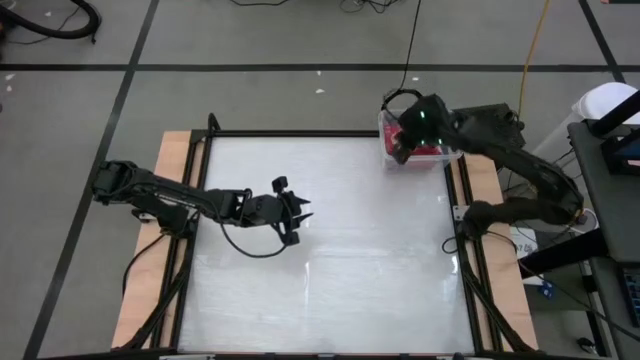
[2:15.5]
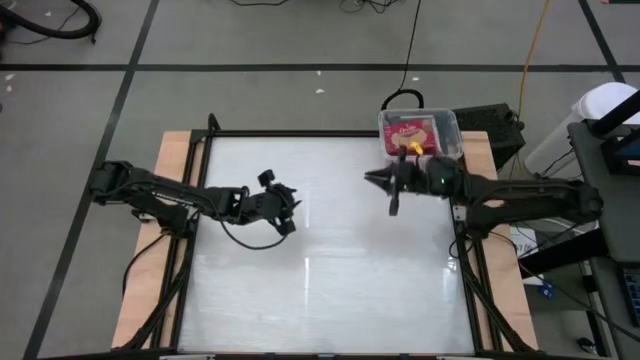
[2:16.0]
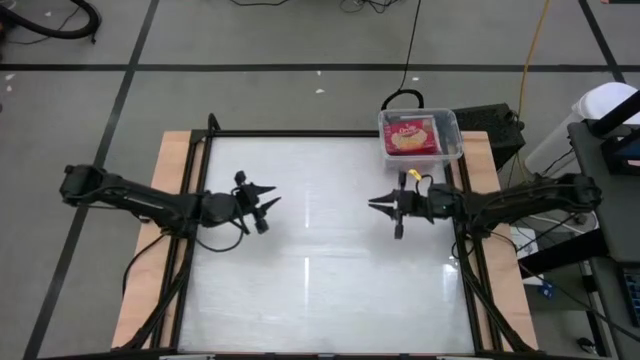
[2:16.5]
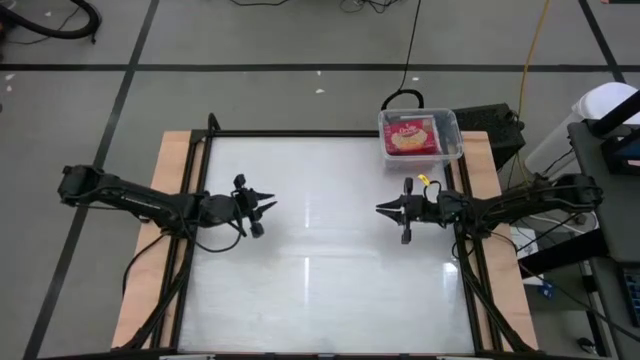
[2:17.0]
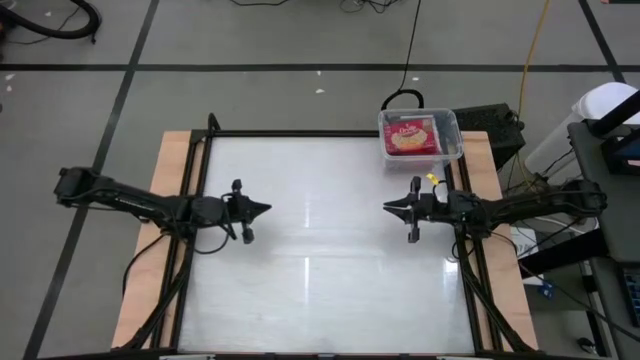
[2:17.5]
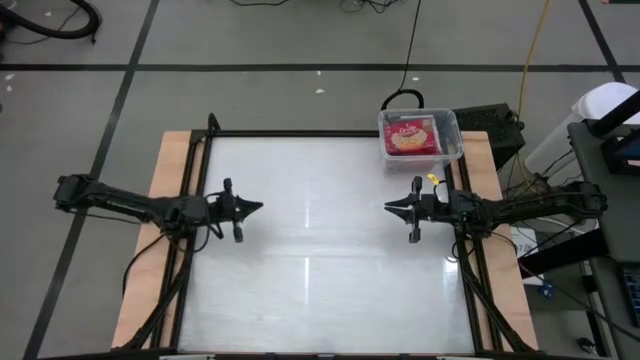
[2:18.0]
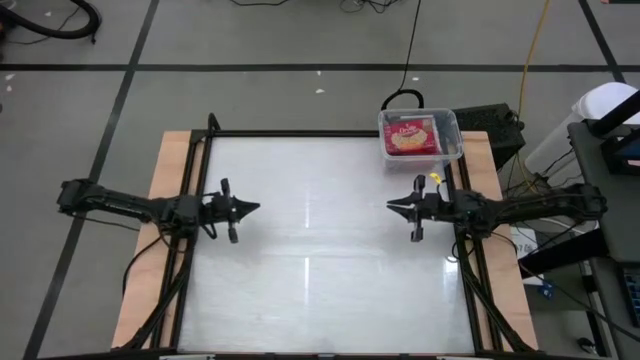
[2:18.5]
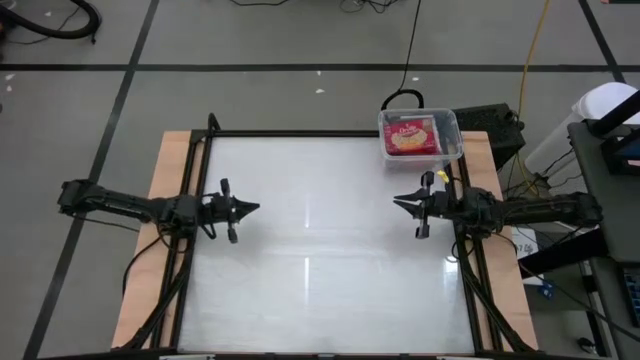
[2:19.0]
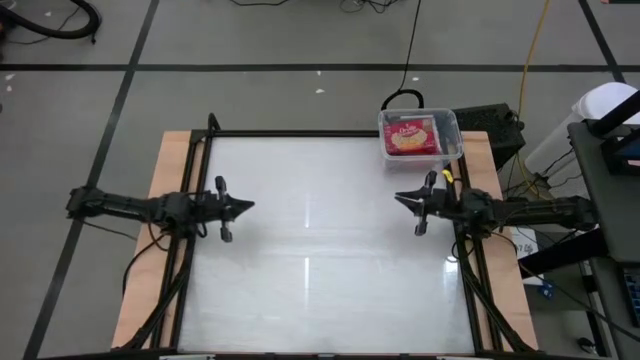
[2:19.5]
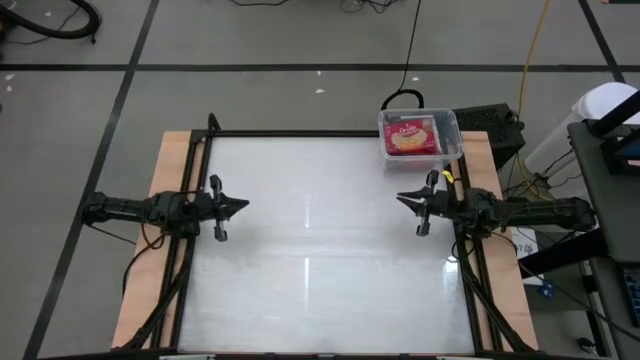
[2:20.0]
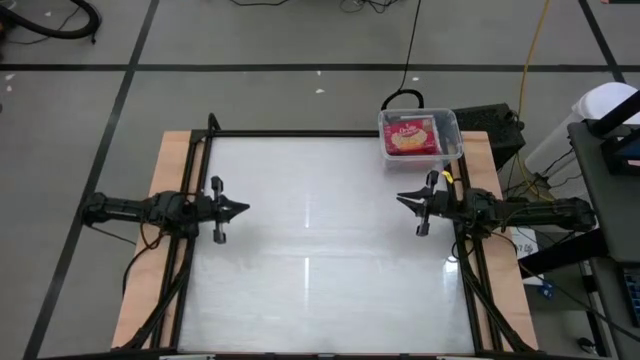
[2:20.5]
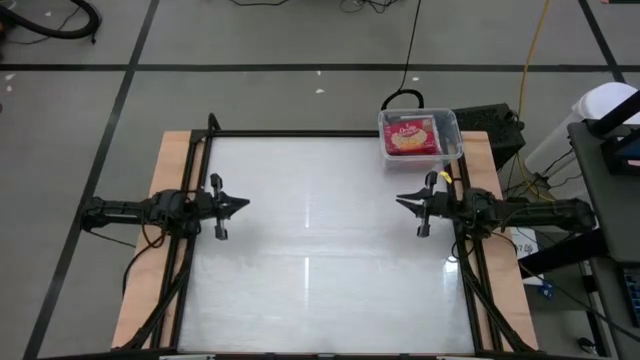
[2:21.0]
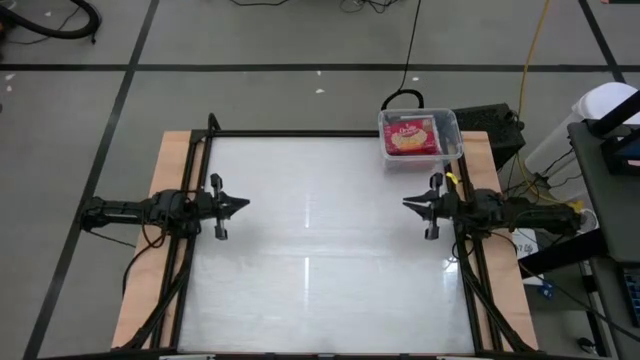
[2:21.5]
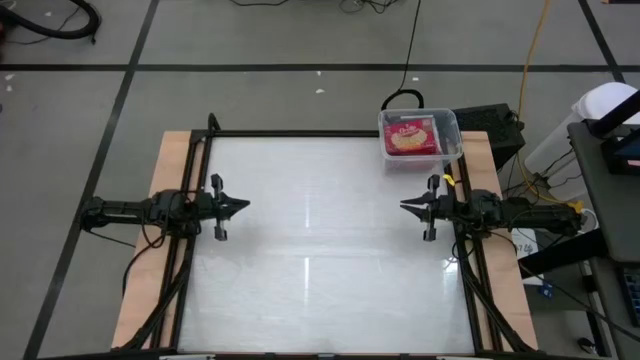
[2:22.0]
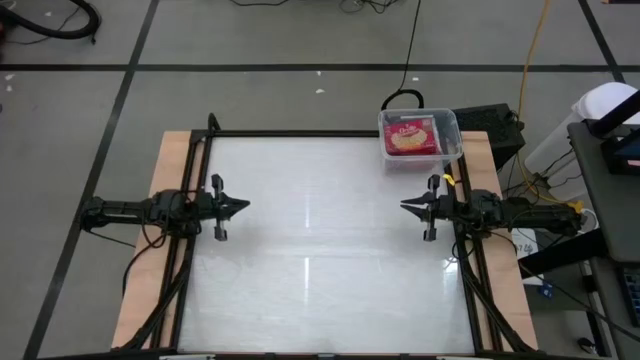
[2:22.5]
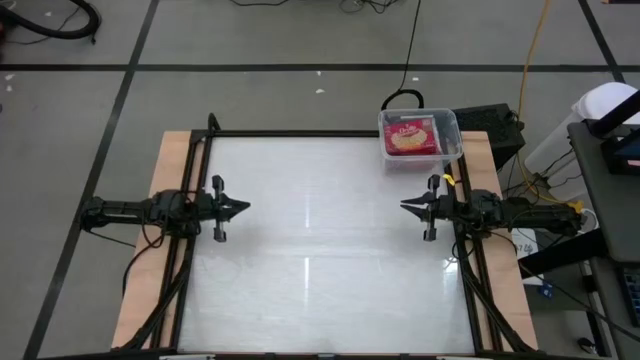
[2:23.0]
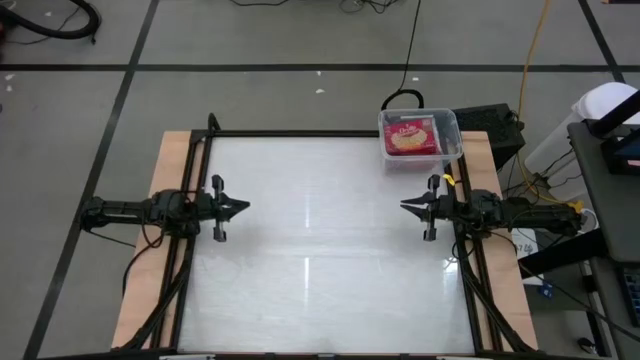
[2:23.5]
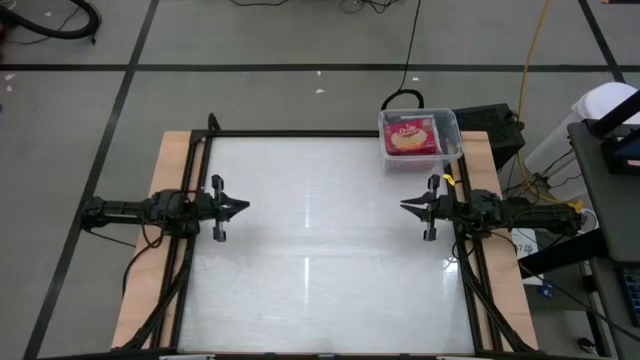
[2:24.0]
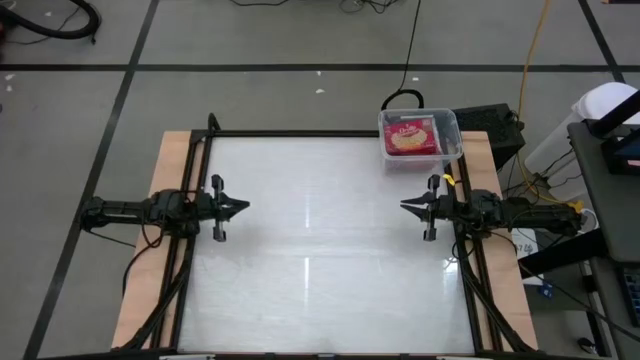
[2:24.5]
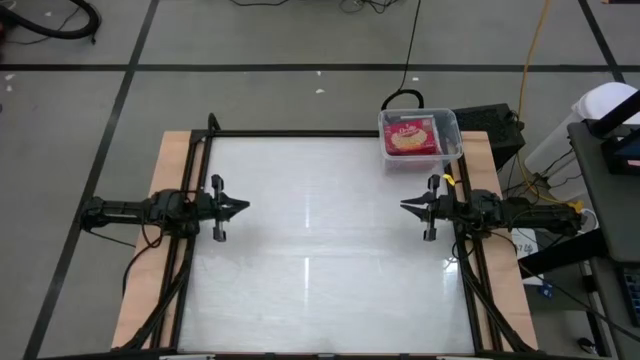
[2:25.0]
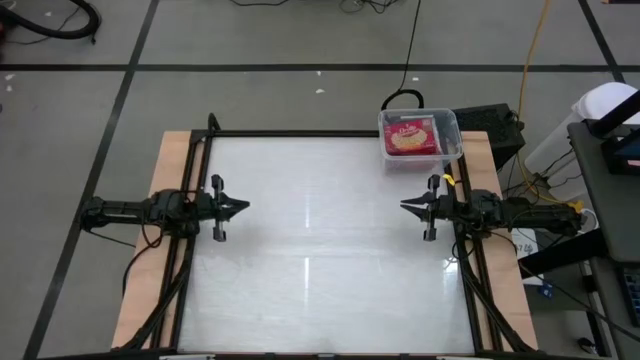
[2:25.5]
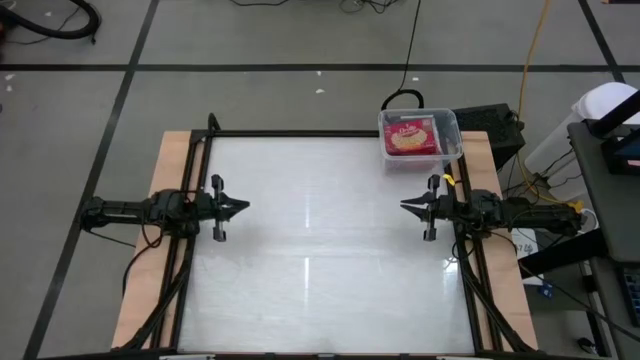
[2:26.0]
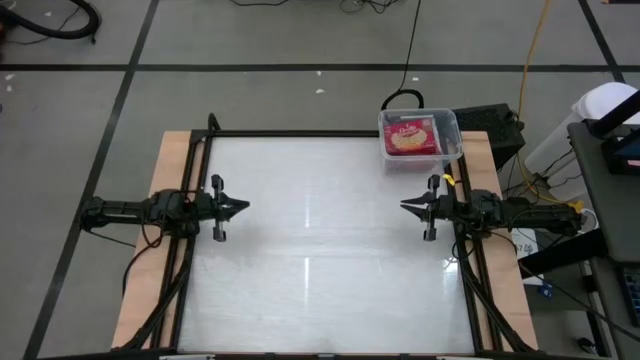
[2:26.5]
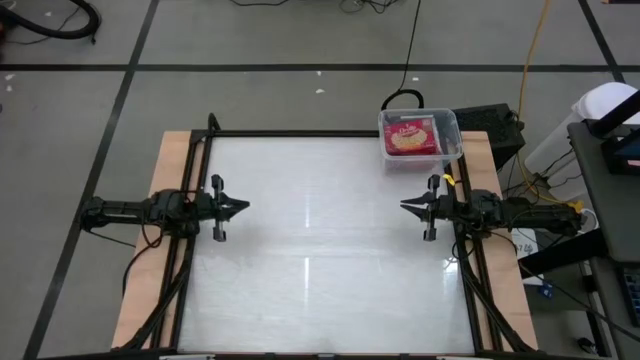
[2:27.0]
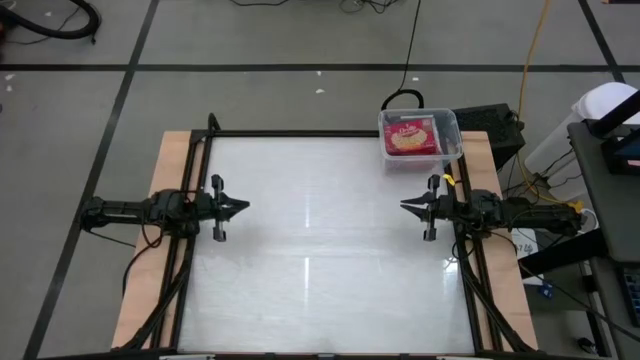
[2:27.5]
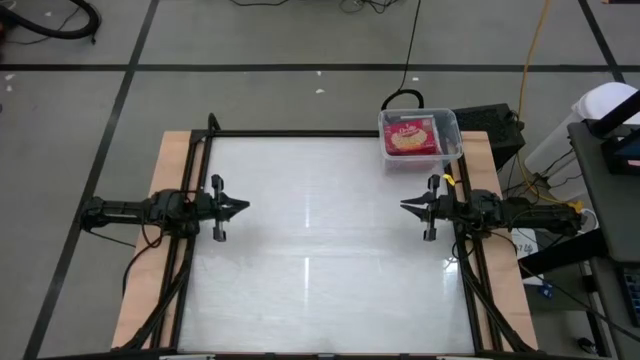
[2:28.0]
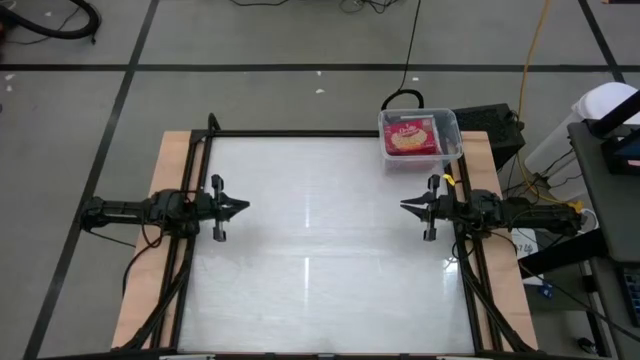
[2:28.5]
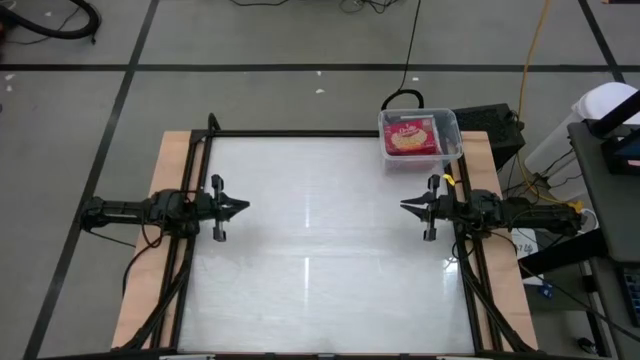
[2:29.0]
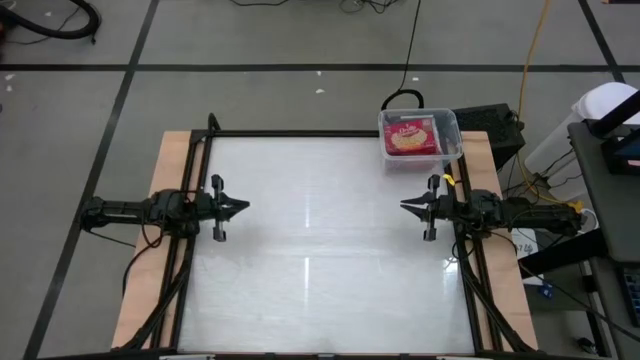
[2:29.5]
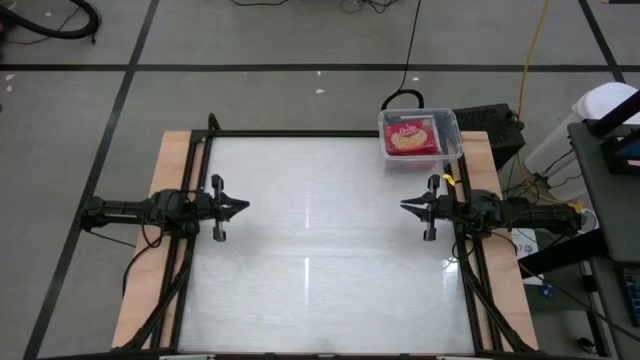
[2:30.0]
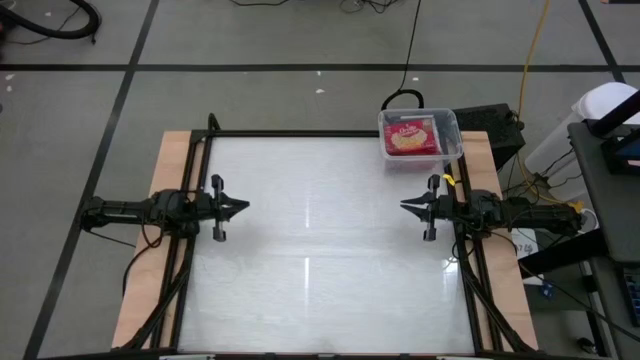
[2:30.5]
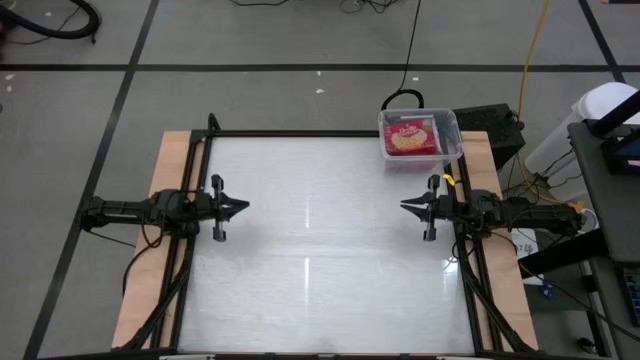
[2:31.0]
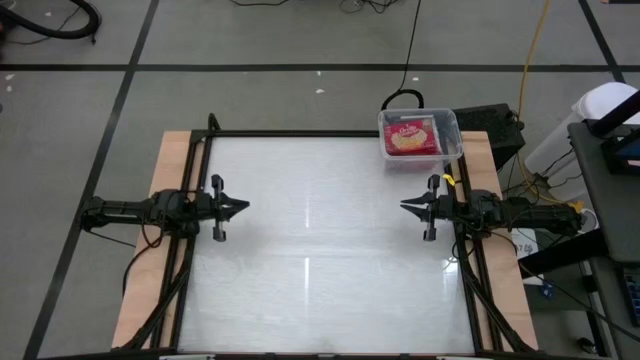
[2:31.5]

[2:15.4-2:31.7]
Task: Sort popcorn bags into baskets
Return to Home Position

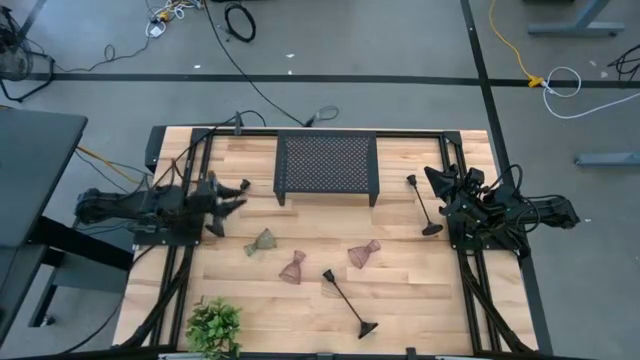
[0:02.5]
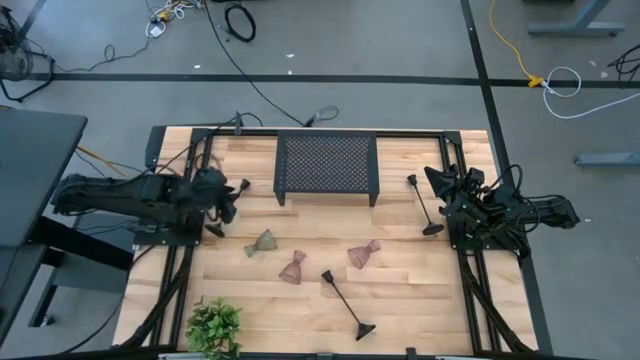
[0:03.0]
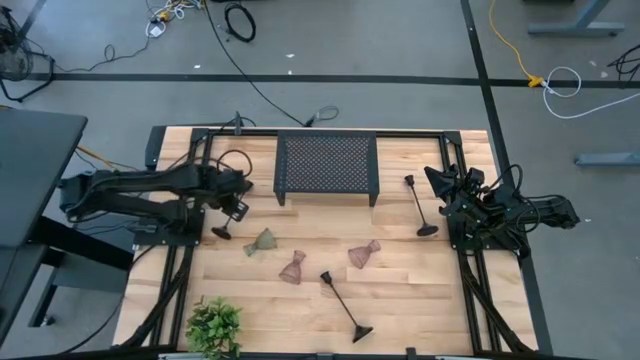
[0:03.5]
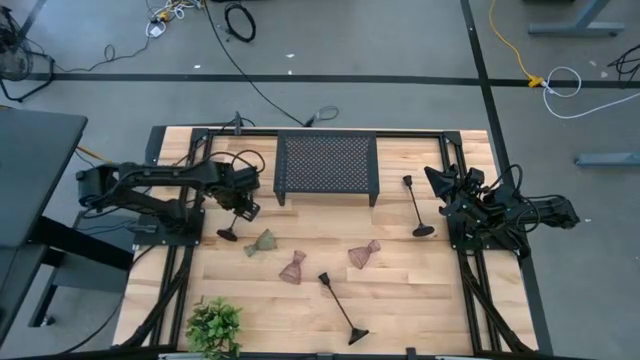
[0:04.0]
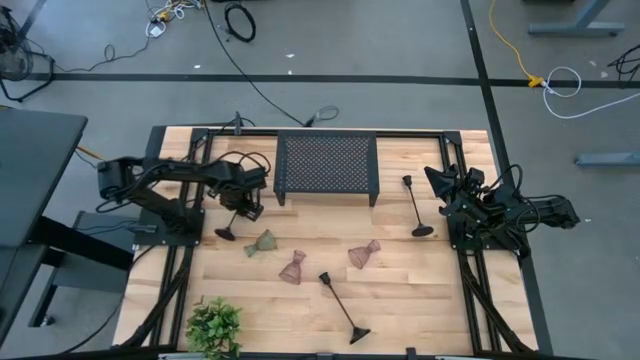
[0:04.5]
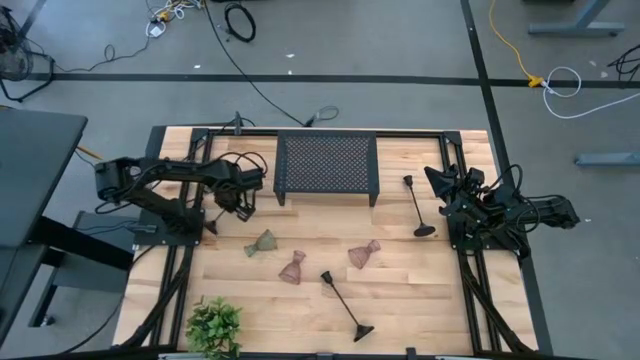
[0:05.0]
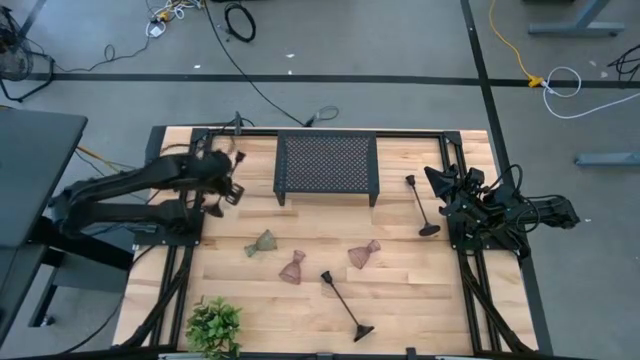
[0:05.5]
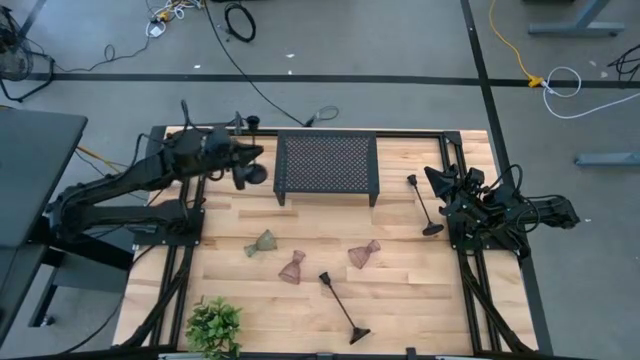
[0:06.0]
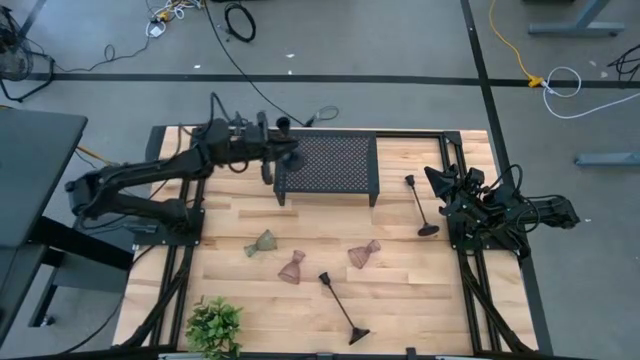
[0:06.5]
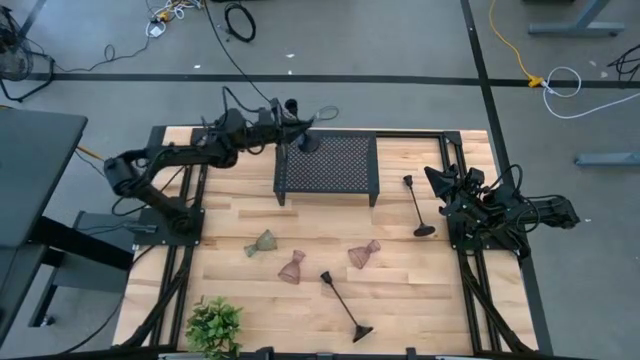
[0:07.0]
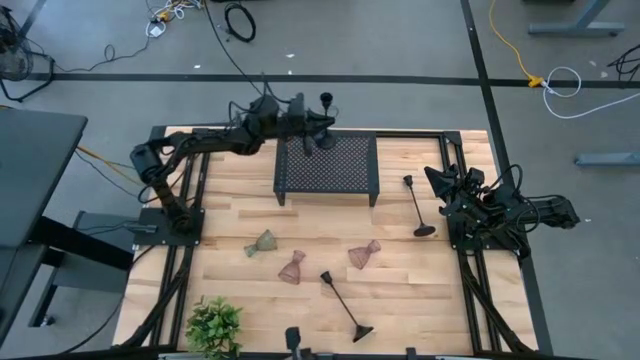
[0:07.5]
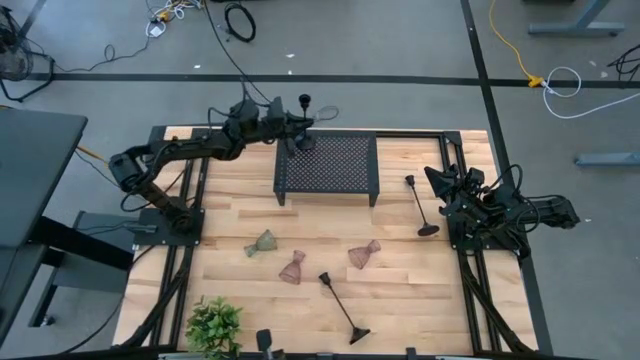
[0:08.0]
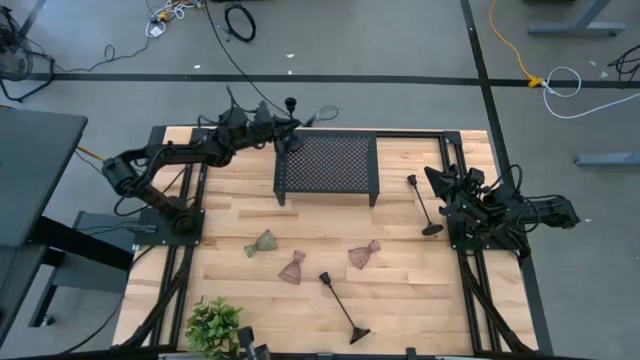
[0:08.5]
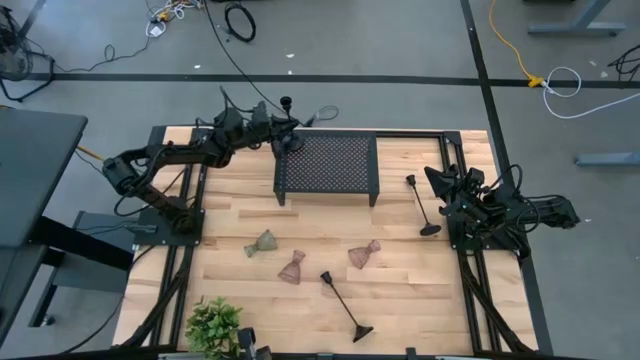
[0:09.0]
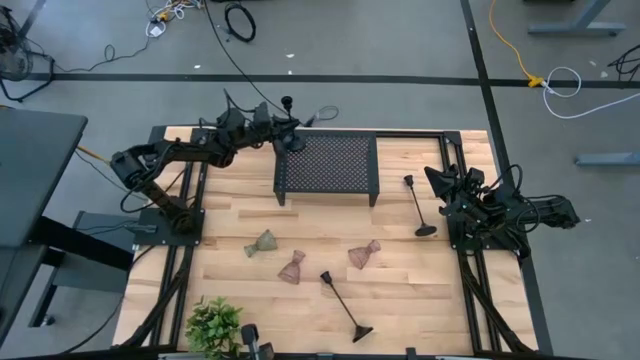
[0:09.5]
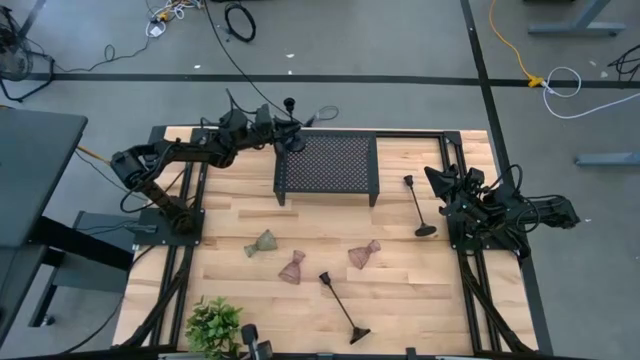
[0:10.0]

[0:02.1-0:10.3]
Task: Pick & Place candle stick holders
Put the top left black candle holder on the shelf
